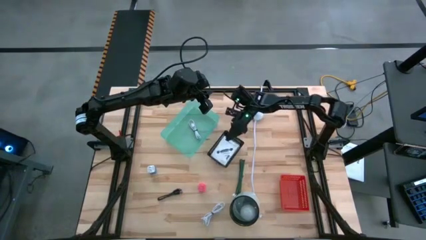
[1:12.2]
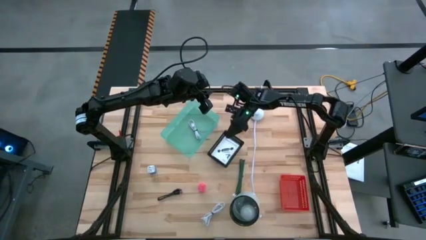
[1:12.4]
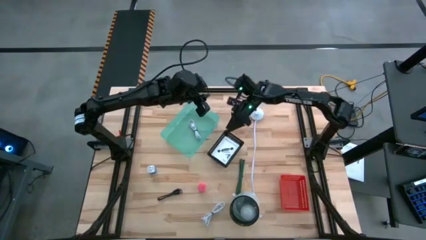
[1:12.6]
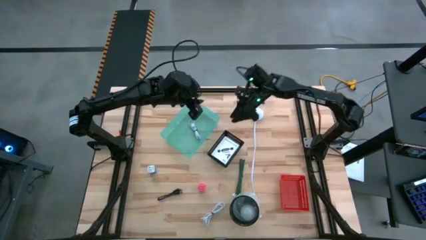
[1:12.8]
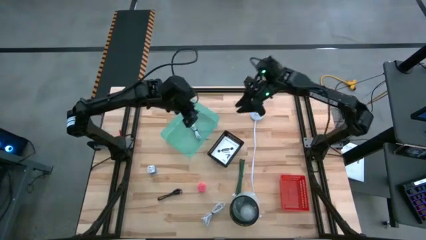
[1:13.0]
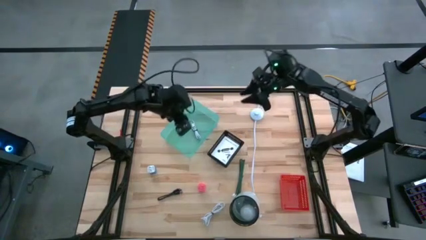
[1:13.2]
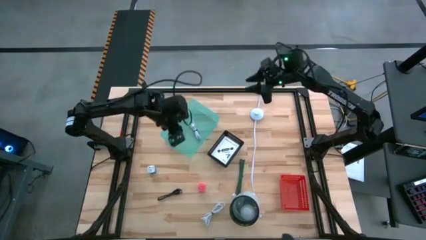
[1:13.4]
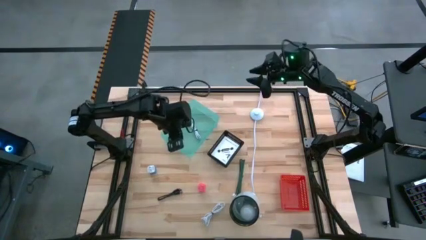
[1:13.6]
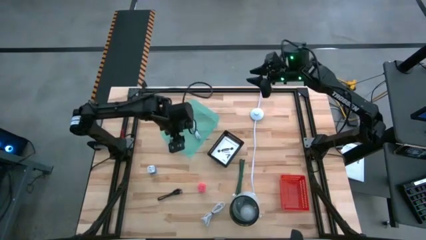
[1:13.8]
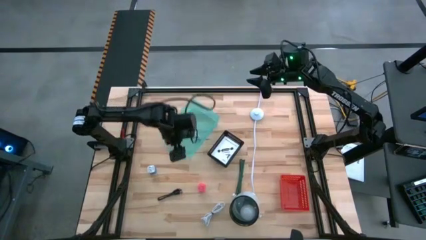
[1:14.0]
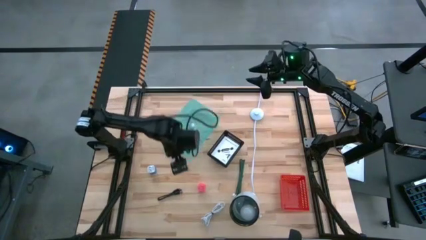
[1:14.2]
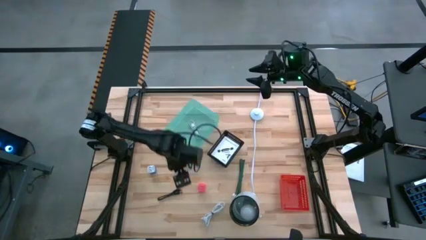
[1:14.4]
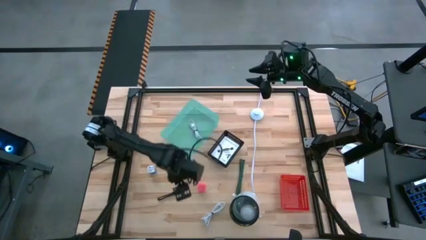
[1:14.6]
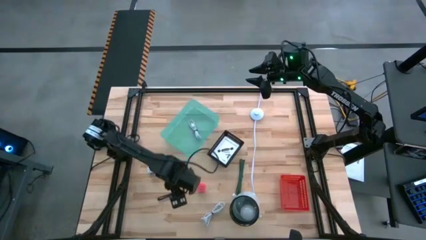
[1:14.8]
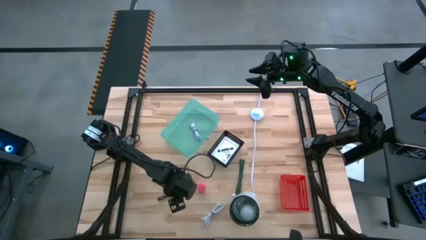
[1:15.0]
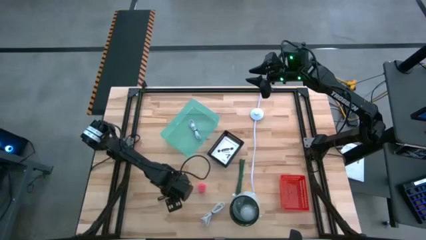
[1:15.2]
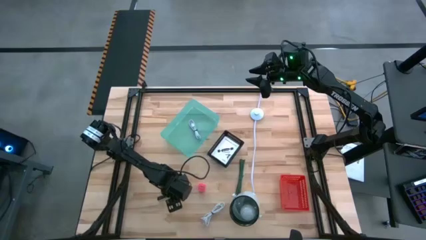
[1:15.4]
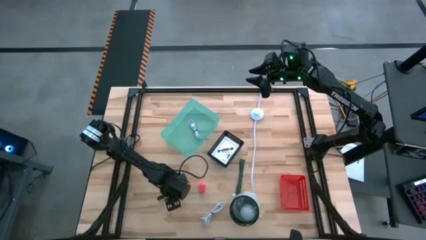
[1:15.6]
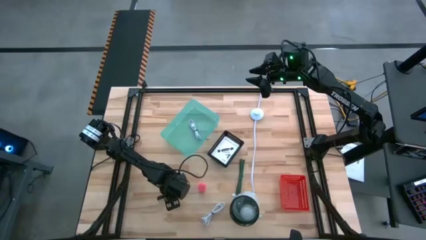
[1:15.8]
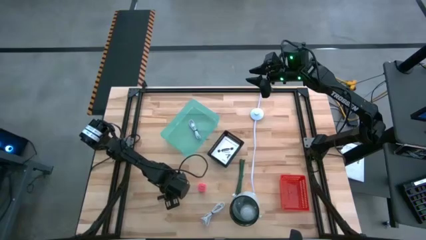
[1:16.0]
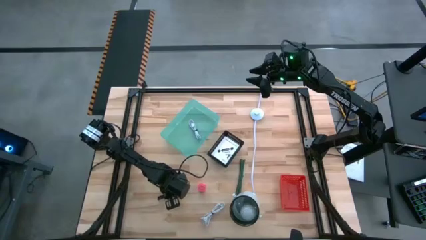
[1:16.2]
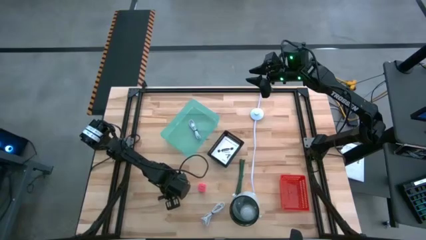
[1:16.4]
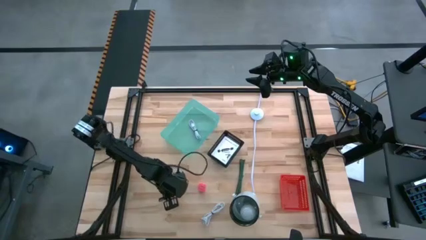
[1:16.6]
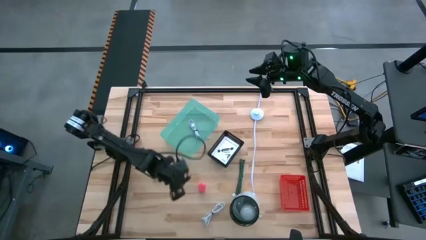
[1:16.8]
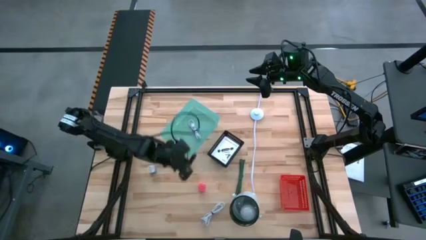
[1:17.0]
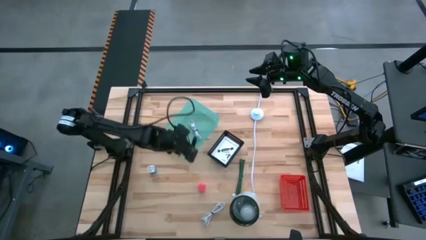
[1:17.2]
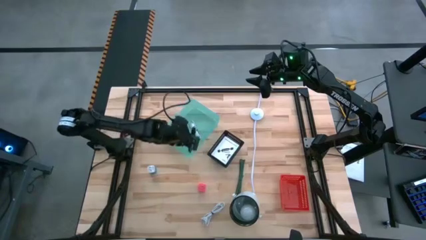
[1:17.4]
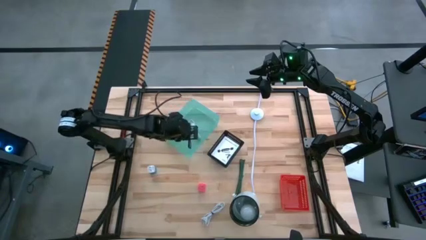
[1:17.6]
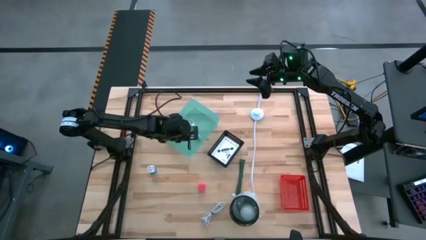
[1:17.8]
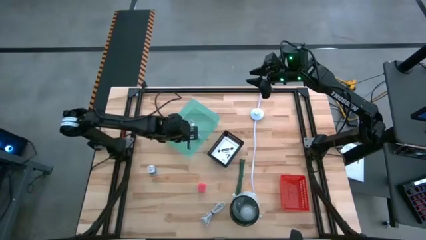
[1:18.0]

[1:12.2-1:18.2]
Task: Pick and place items into bin
Put the black charger cable into the green bin

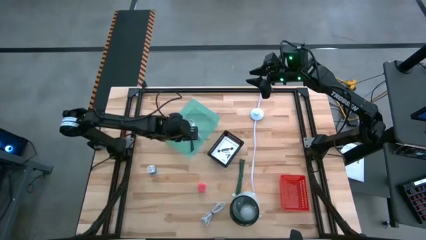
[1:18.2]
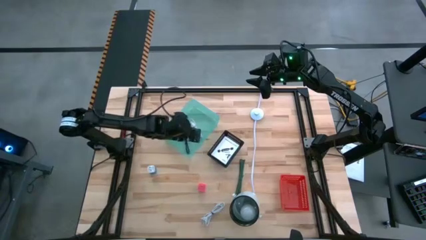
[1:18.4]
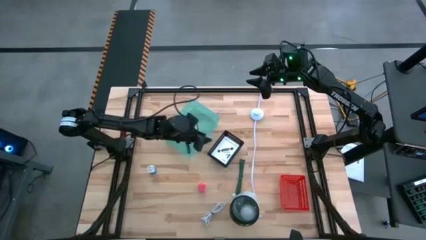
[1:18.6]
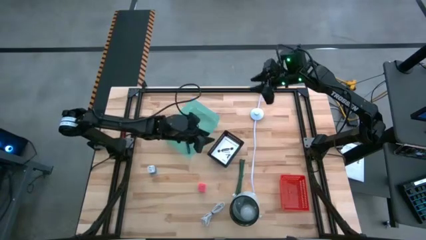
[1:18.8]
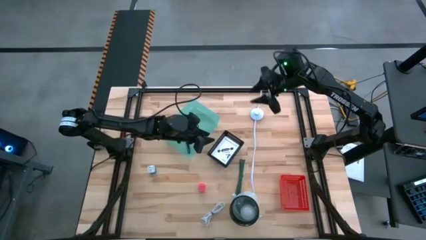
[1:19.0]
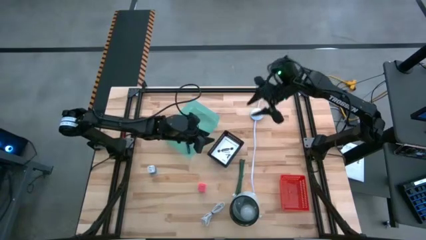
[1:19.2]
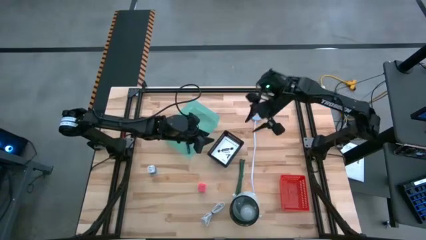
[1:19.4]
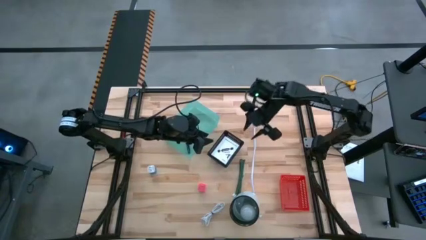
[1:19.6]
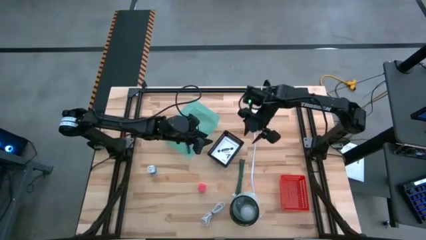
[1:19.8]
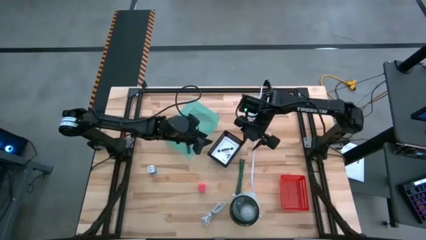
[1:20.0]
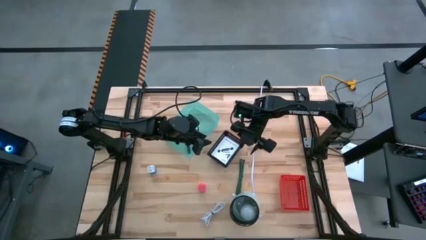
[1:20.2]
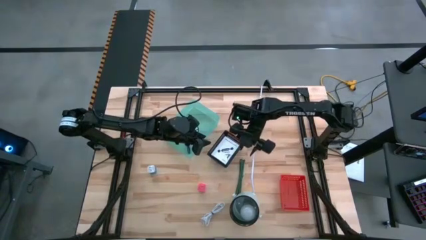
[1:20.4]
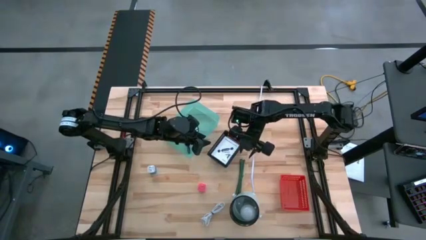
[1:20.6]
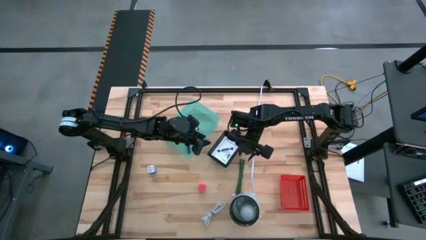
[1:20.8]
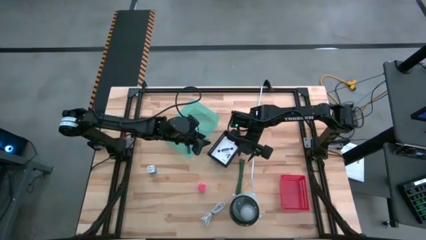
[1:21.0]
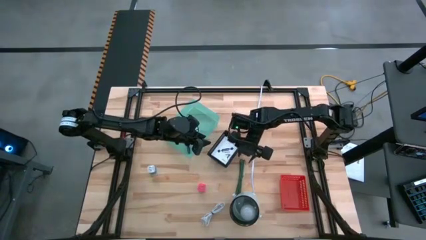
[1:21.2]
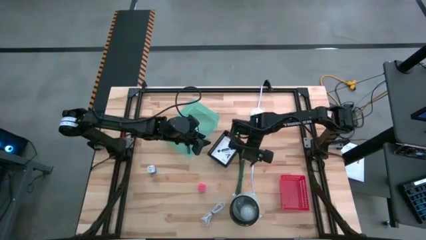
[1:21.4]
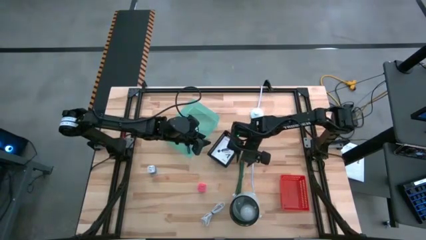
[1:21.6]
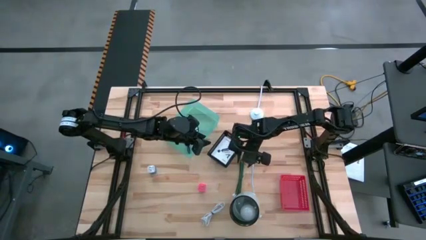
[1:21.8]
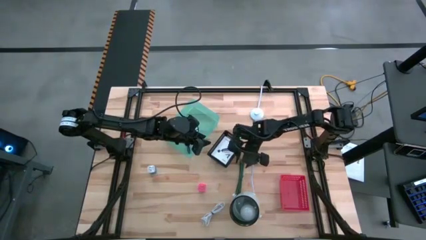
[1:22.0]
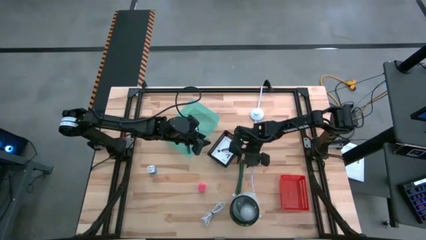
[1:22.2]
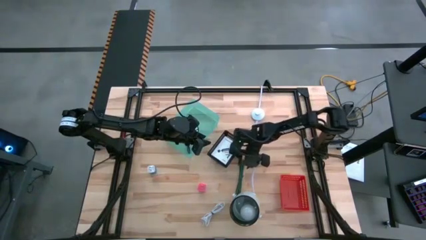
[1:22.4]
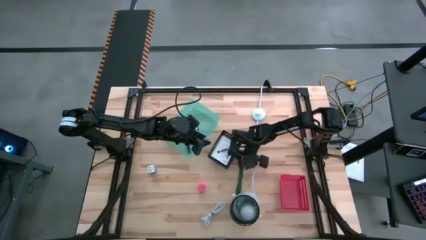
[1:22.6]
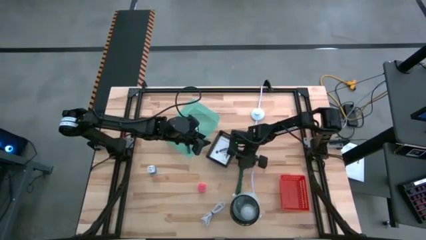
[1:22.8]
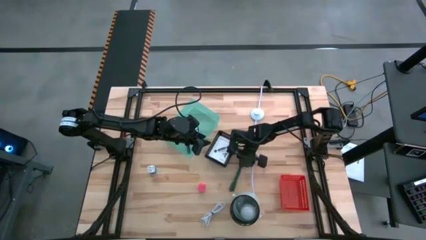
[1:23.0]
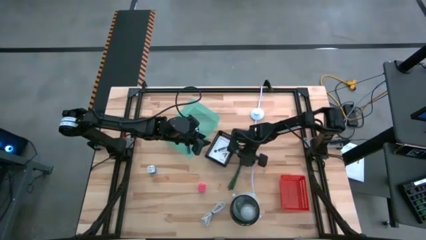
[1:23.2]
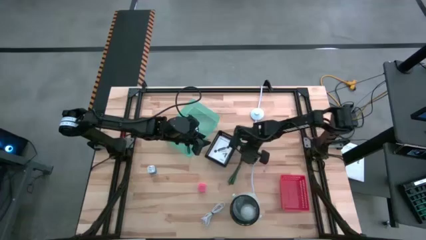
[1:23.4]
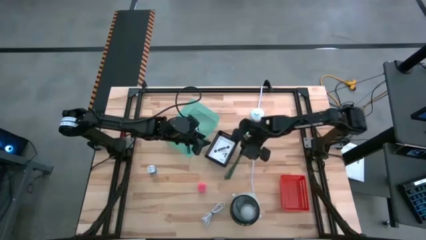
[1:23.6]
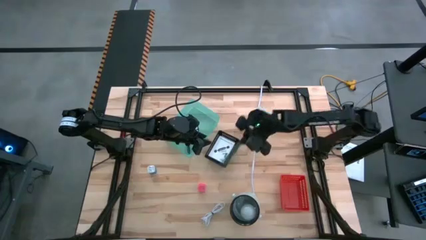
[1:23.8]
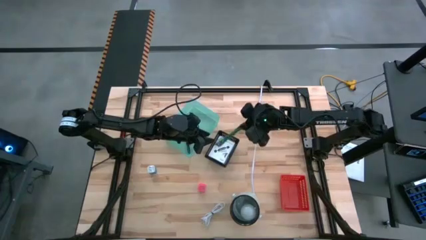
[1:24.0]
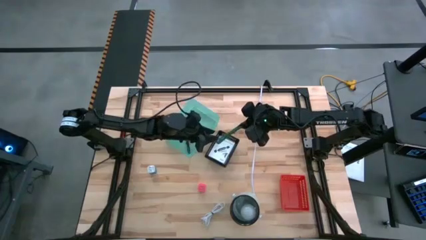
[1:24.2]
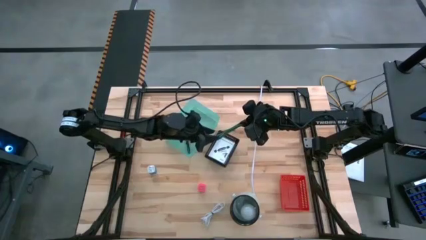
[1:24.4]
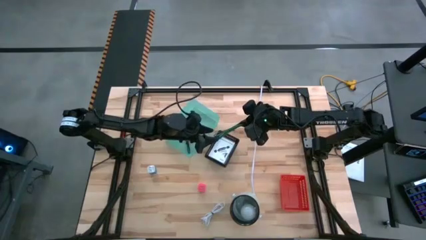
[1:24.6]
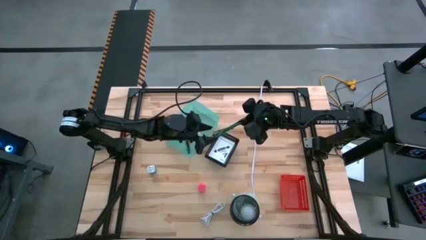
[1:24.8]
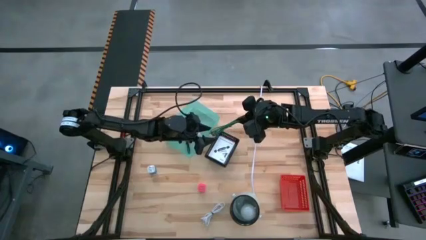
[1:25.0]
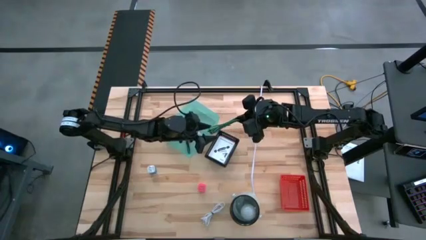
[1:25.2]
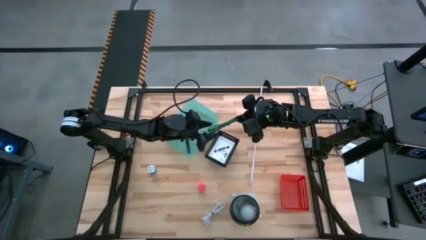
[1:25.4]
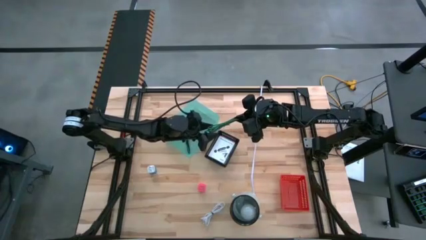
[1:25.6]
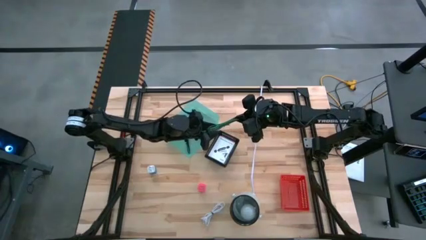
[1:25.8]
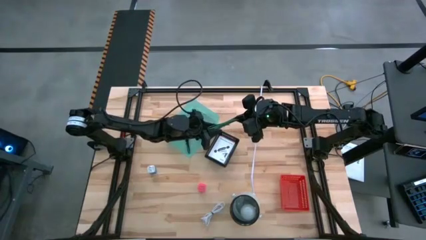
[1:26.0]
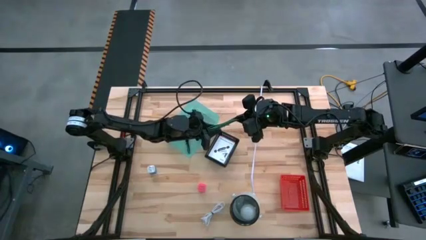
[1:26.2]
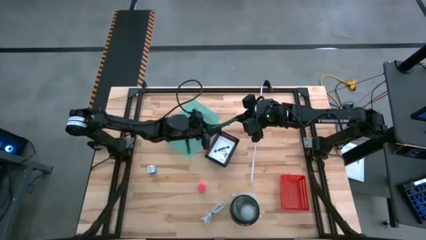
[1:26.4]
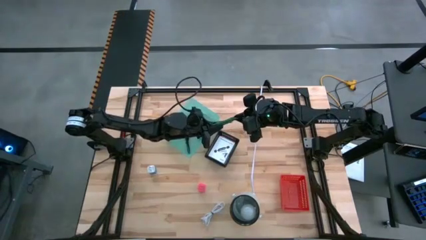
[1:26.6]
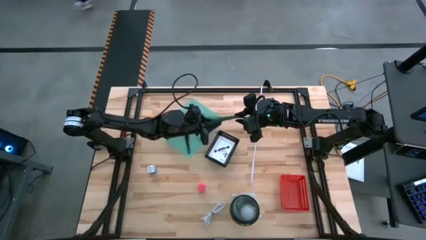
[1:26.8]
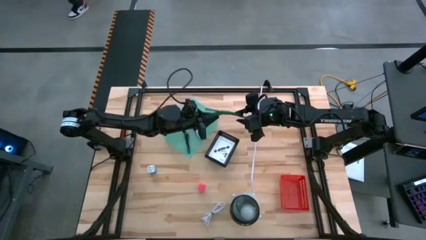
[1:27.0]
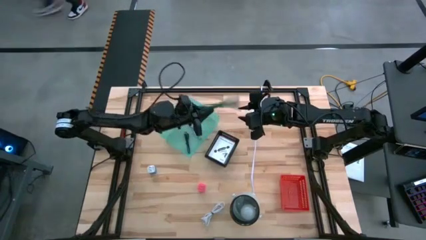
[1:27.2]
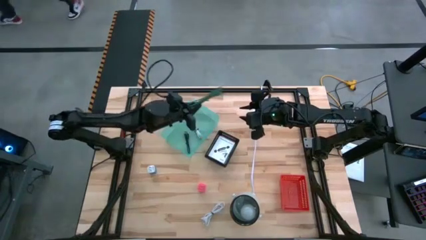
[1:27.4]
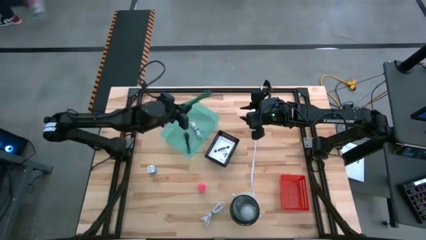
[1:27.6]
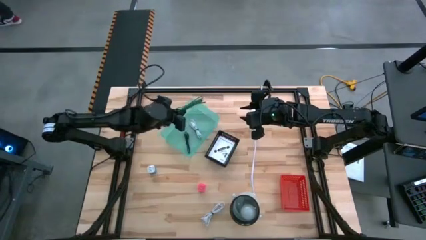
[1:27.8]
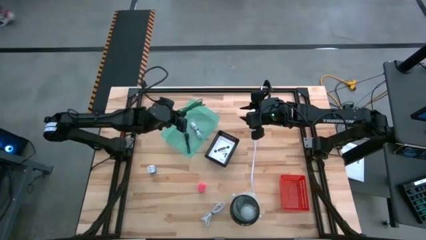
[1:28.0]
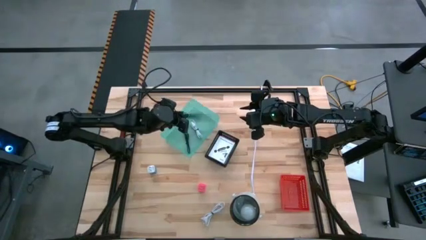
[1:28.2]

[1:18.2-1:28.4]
Put the green charger cable into the green bin
